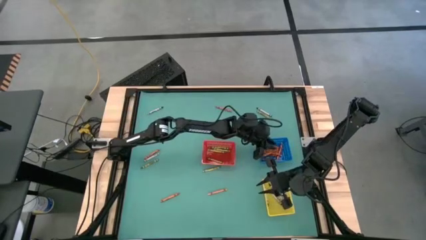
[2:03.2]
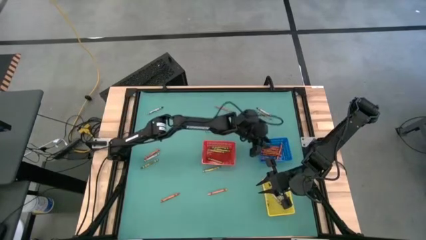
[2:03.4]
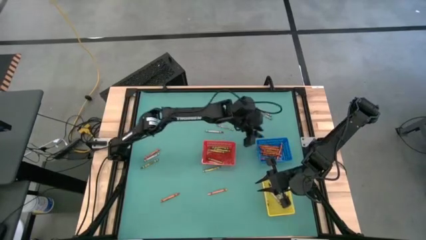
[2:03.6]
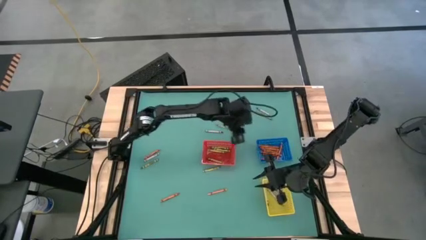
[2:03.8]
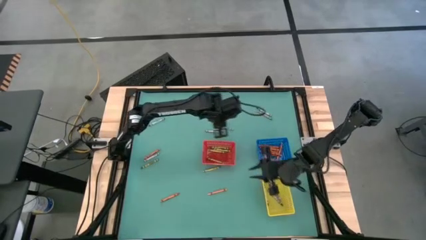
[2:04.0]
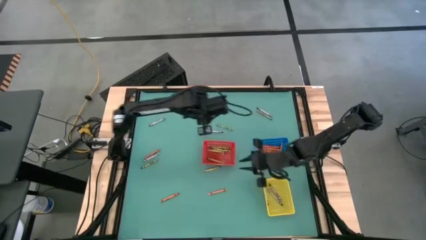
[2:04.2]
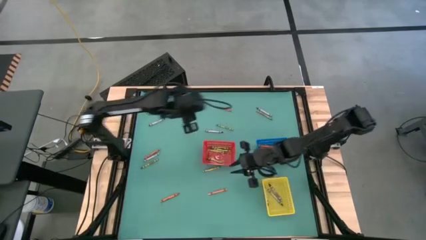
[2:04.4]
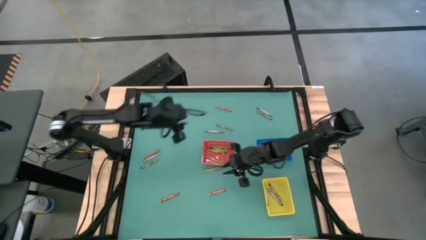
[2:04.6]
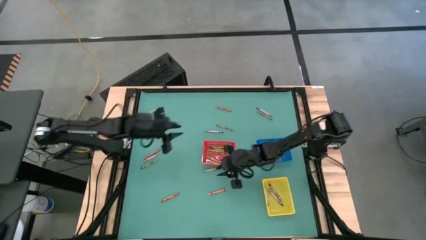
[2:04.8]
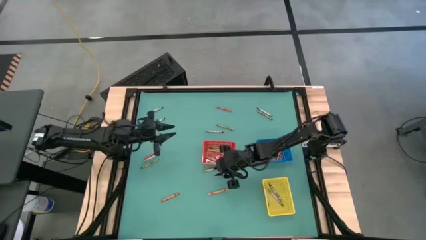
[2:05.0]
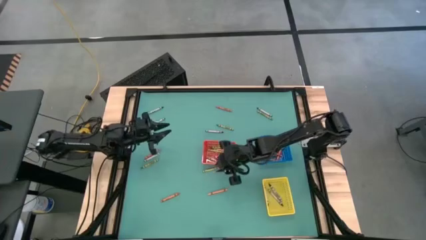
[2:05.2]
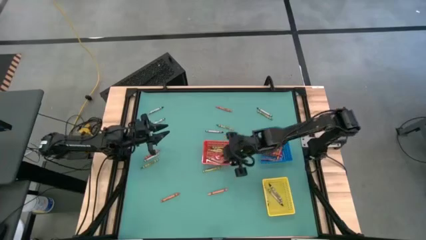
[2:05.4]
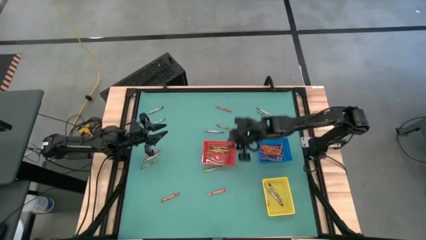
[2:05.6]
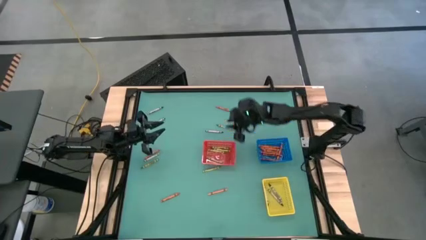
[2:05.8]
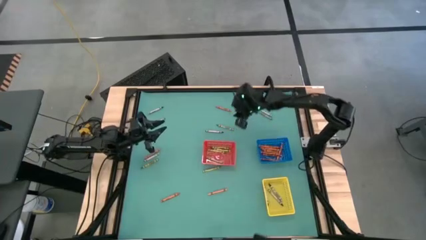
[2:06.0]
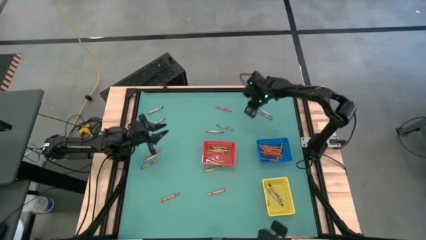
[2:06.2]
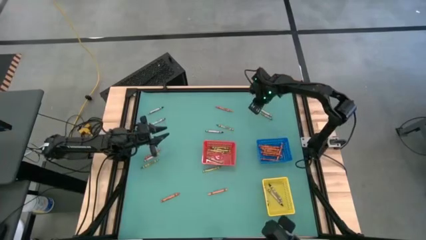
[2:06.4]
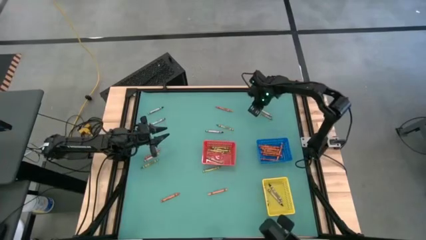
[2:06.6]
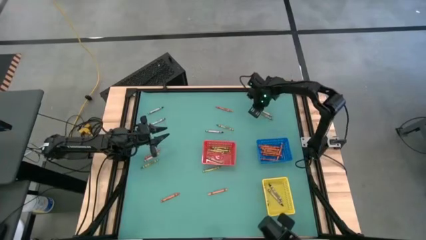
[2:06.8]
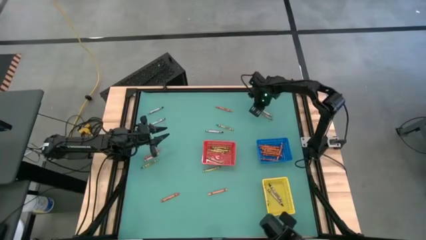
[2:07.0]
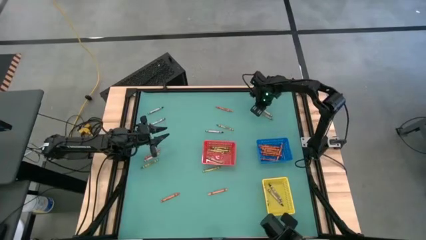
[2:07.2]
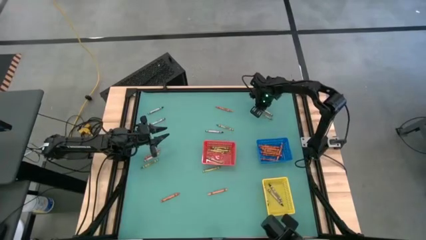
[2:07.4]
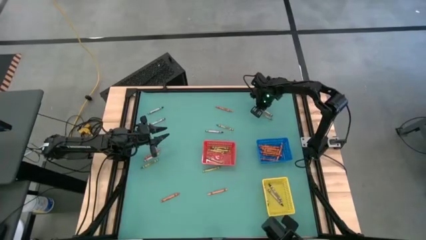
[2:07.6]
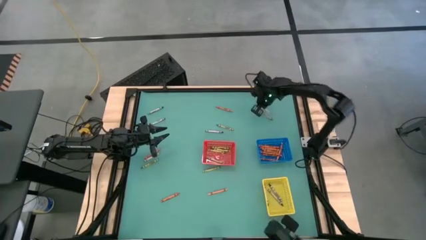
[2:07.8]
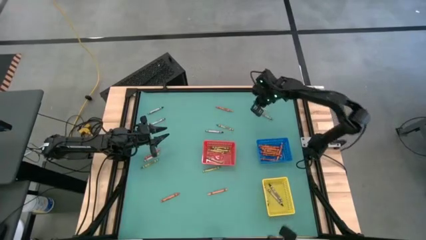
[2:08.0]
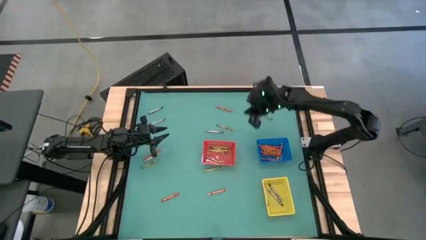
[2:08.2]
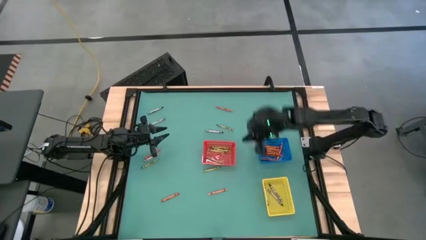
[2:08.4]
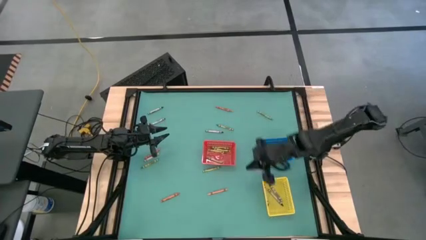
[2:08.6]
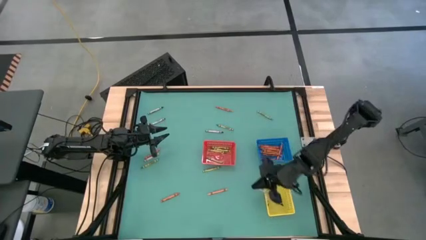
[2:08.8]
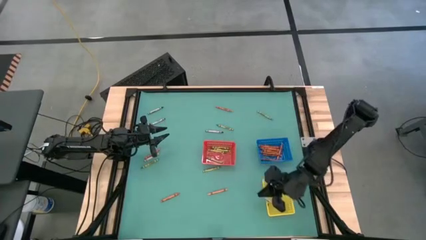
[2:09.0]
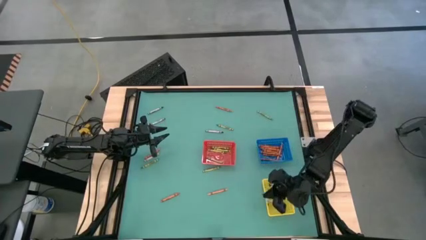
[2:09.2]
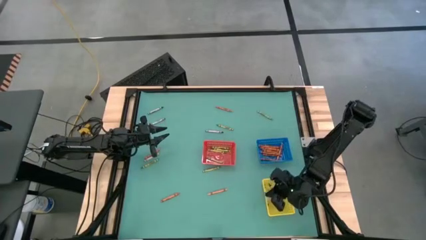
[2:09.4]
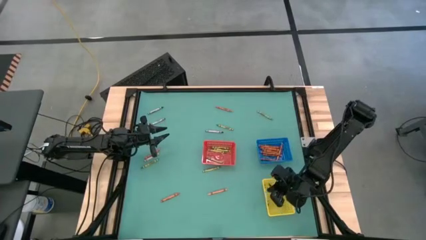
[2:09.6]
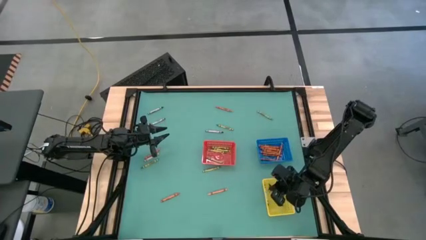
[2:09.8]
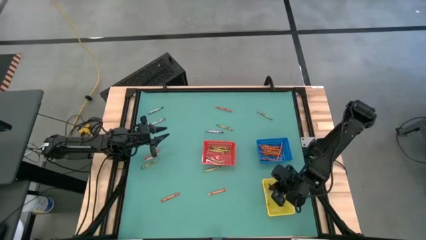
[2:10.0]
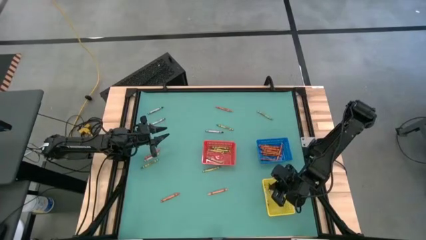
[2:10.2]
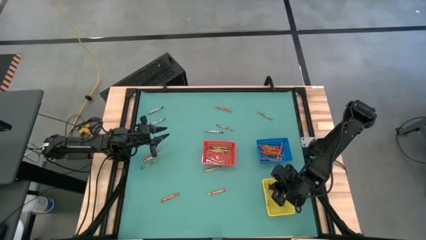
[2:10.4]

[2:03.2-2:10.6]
Task: Sort crayons
Put the black crayon into the yellow basket

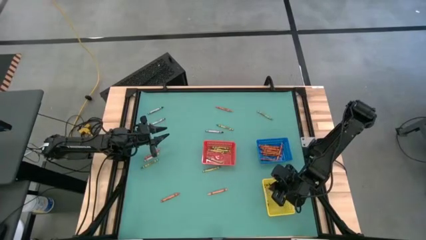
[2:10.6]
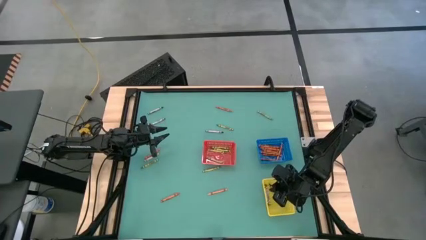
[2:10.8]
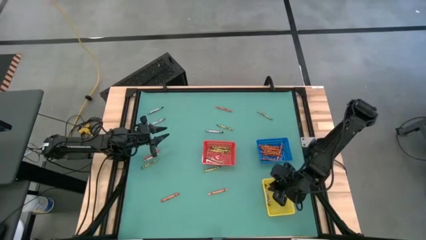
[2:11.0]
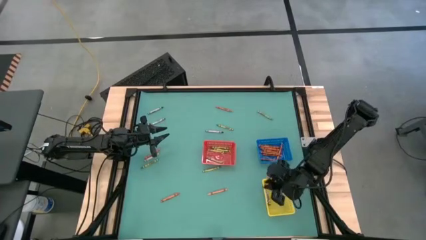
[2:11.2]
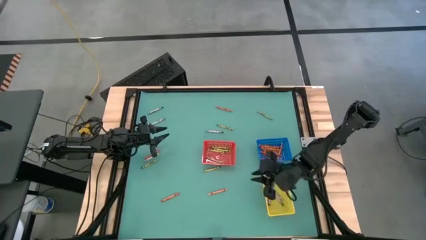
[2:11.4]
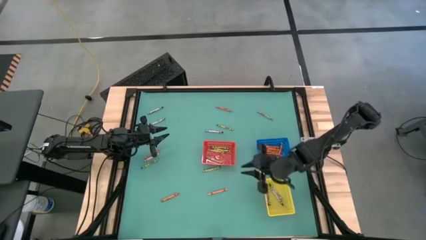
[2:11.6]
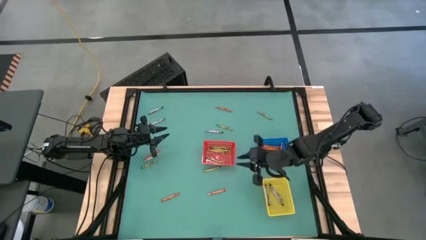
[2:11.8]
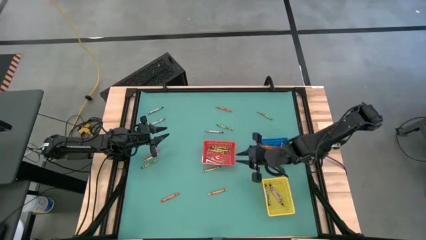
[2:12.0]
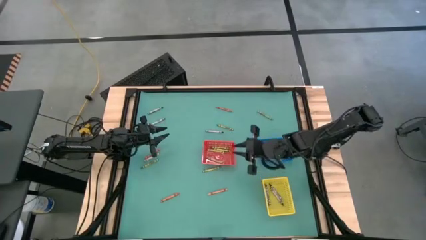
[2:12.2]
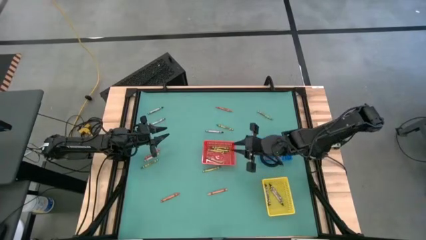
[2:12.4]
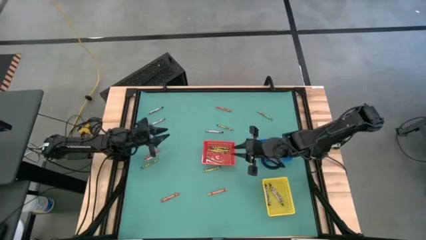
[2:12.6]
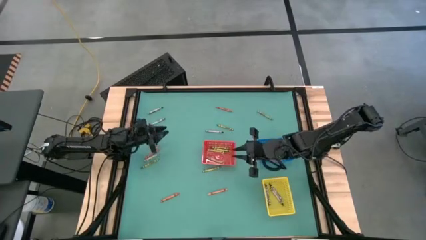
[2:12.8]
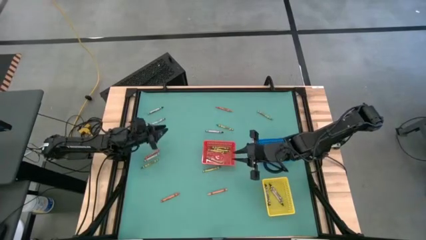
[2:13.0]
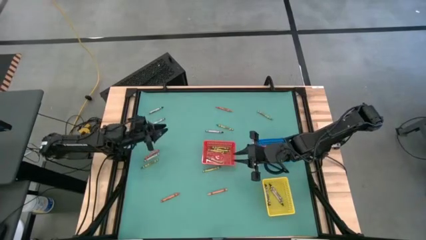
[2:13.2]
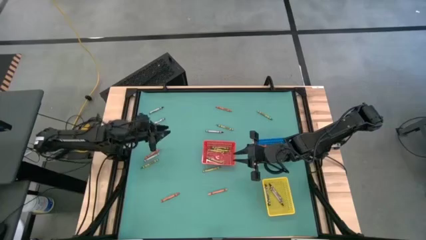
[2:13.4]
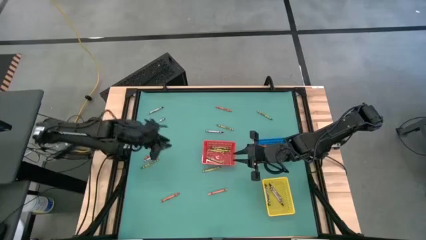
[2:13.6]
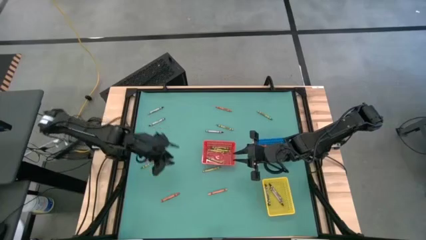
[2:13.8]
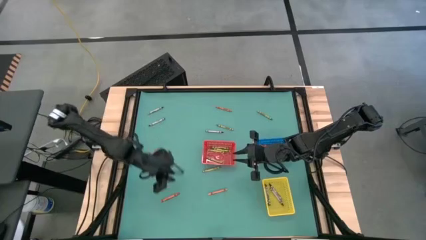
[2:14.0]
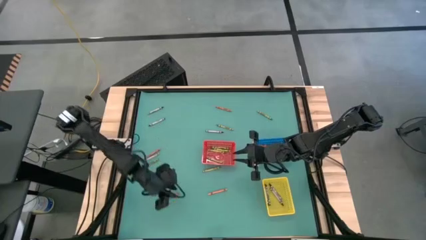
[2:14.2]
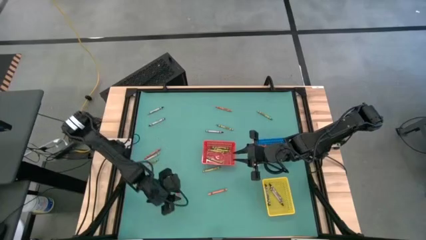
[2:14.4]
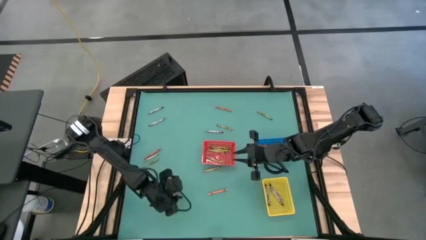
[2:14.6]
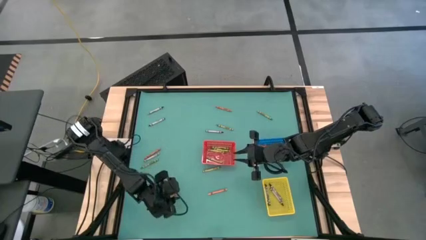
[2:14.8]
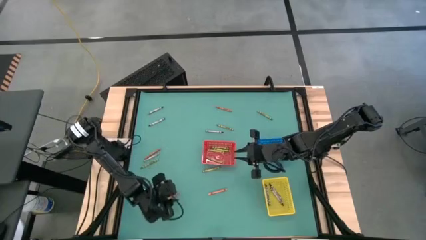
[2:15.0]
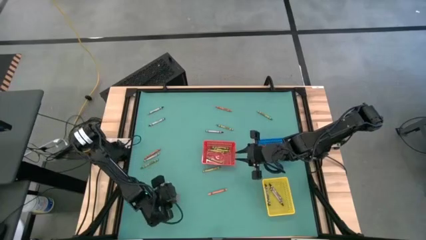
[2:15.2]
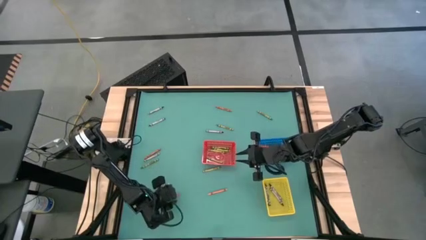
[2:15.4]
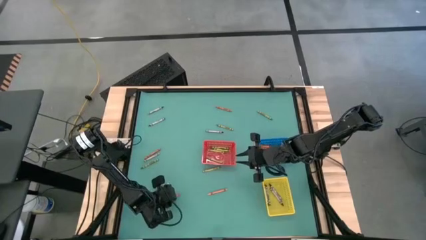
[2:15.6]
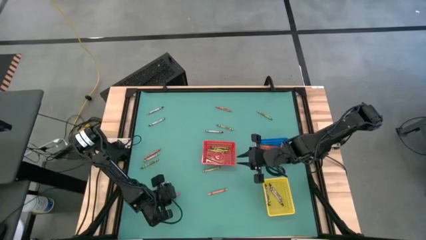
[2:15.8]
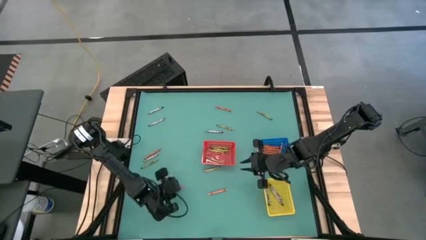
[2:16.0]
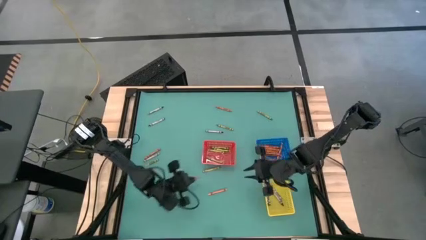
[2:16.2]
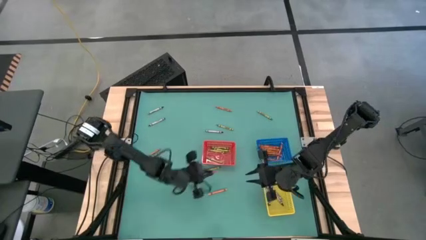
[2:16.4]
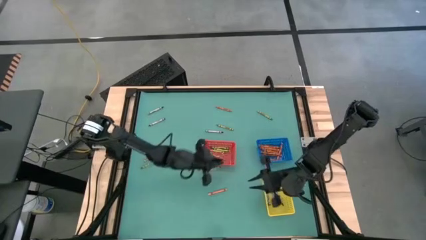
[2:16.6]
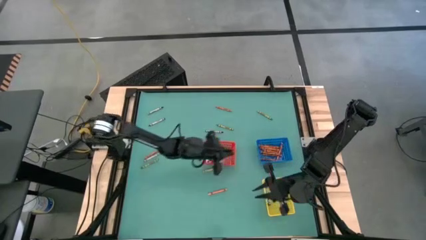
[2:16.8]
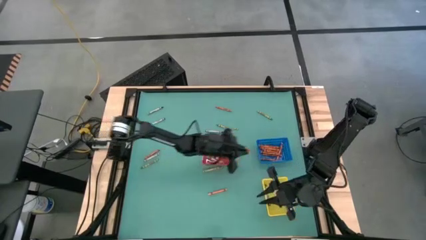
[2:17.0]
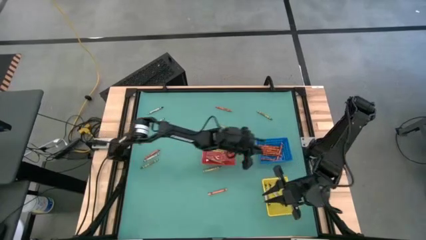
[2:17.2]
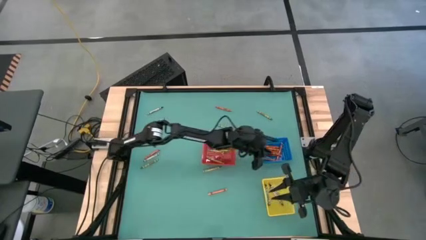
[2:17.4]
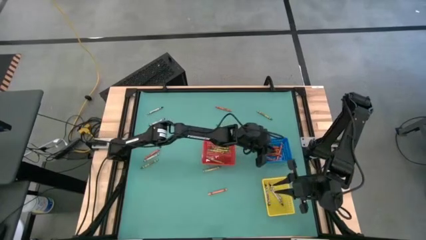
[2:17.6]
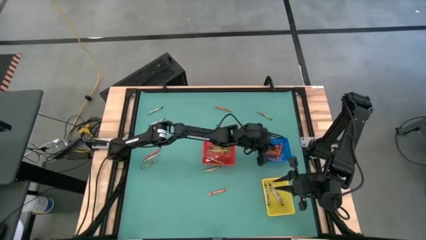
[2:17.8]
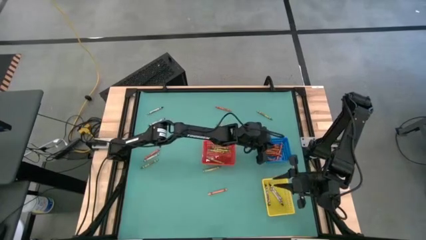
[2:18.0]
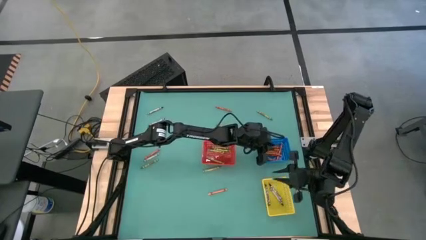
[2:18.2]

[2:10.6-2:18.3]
Put the orange crayon into the blue basket

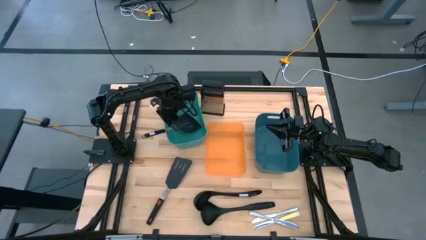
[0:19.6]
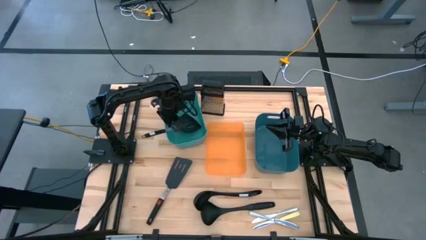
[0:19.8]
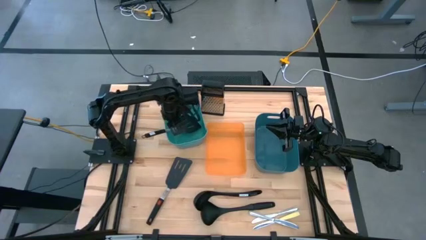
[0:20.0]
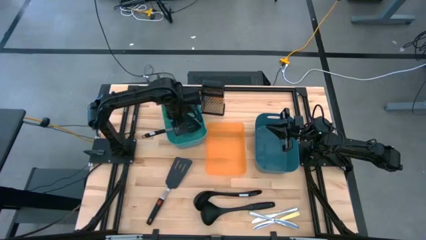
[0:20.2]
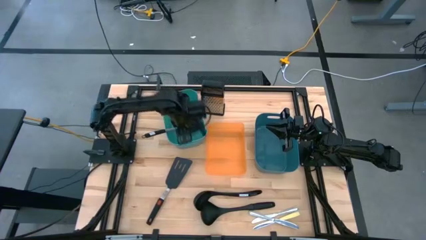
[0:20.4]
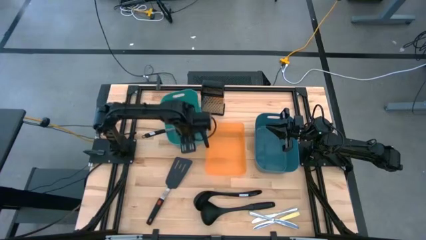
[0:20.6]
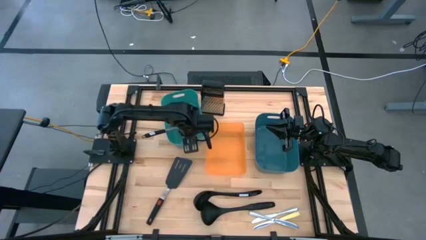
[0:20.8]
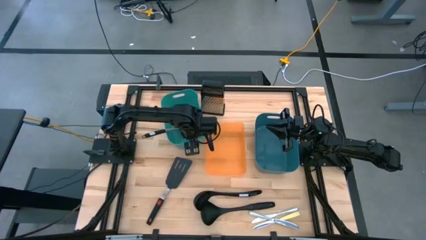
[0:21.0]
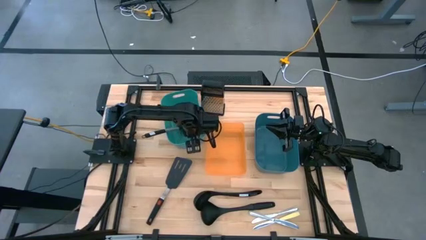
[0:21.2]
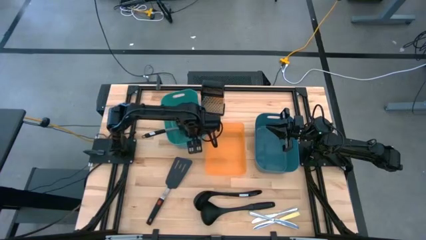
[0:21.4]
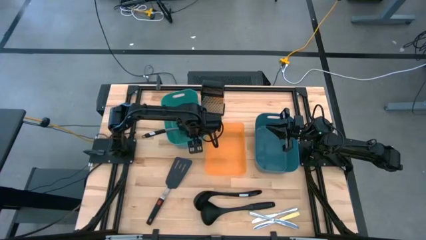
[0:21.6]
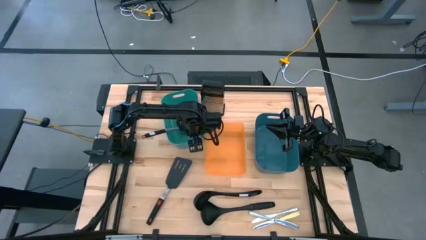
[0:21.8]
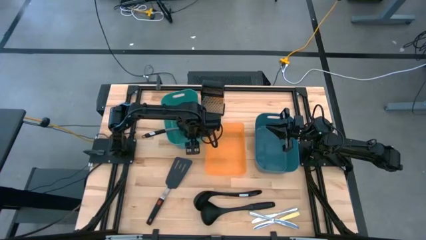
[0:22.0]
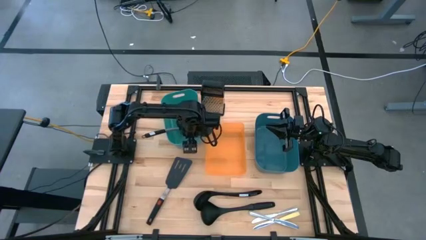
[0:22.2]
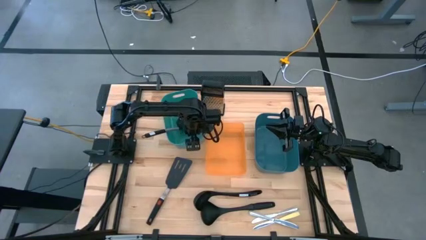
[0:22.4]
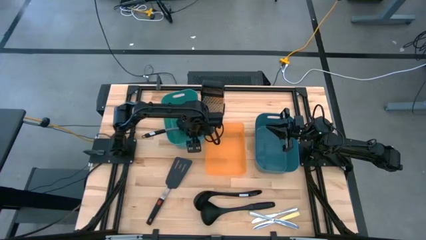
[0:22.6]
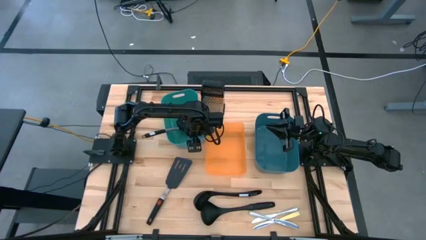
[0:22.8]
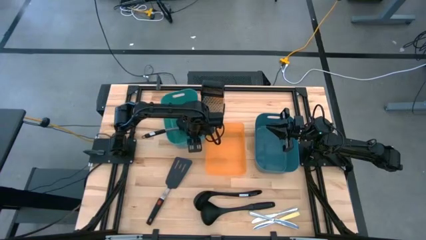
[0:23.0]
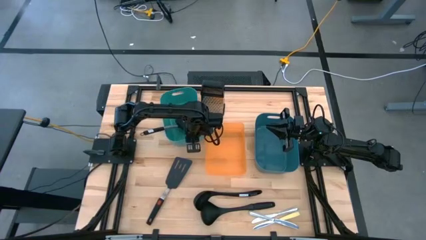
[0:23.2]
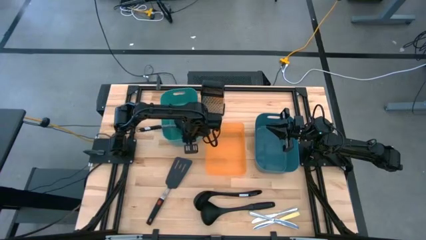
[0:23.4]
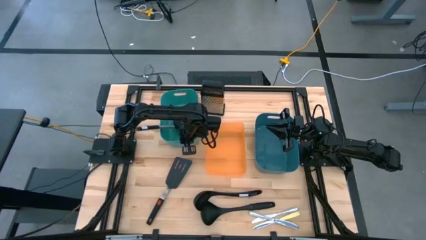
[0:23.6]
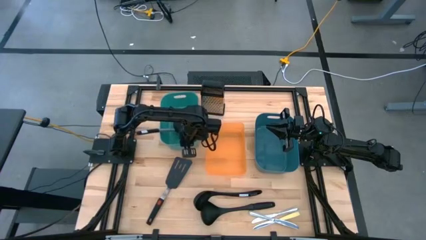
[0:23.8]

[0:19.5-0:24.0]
Task: Pick & Place Kitchen Items
Adjust the green bin
